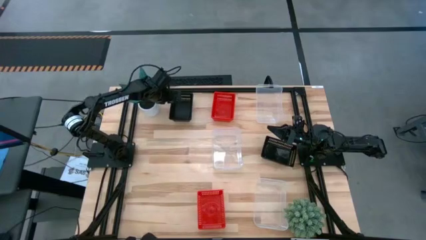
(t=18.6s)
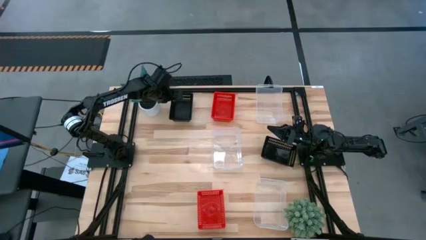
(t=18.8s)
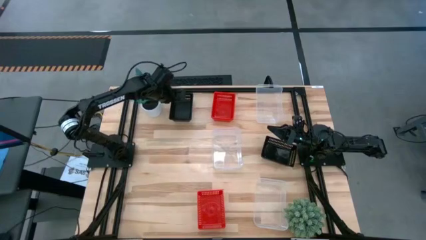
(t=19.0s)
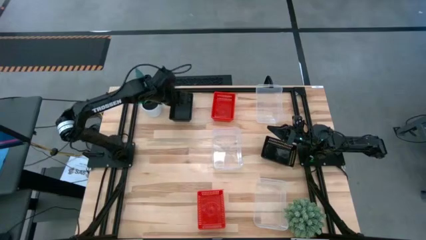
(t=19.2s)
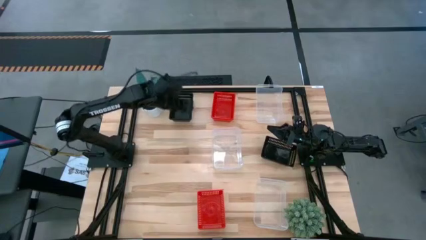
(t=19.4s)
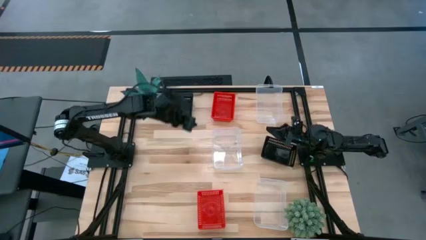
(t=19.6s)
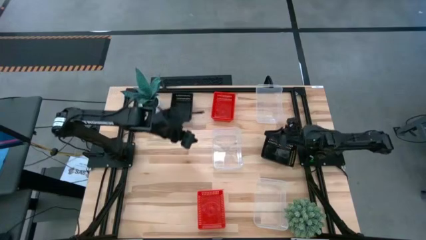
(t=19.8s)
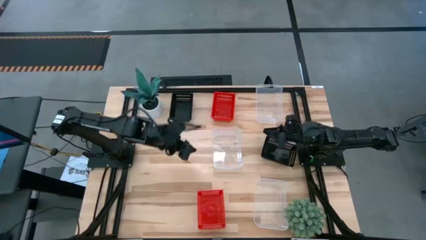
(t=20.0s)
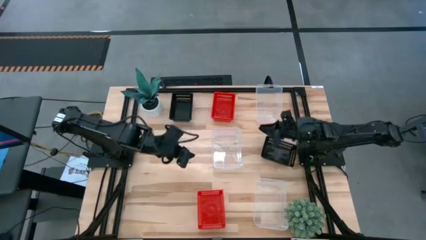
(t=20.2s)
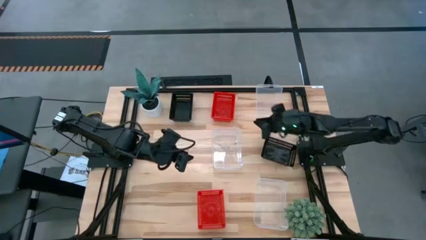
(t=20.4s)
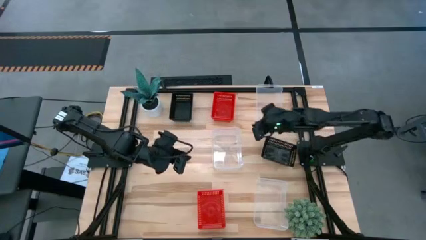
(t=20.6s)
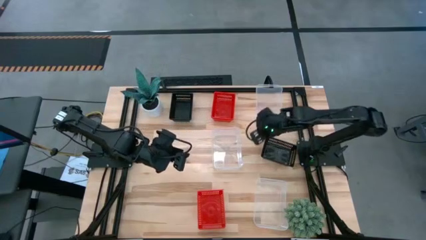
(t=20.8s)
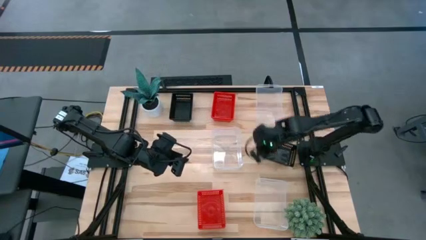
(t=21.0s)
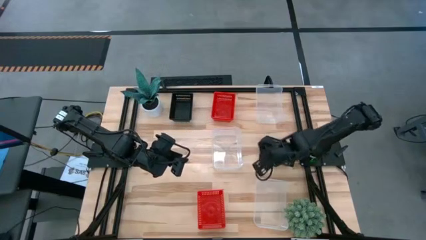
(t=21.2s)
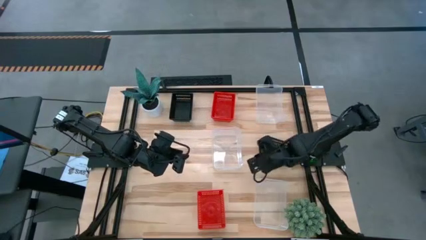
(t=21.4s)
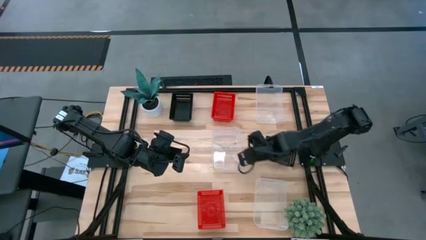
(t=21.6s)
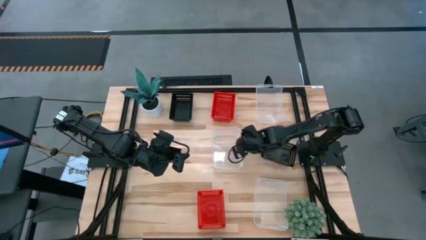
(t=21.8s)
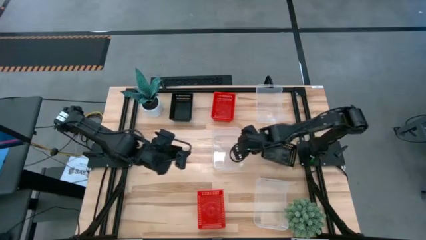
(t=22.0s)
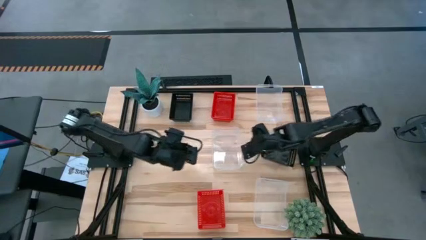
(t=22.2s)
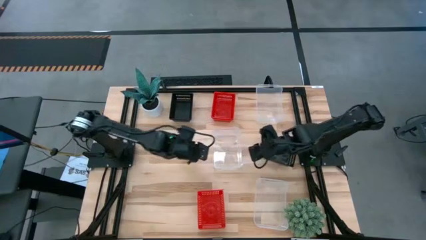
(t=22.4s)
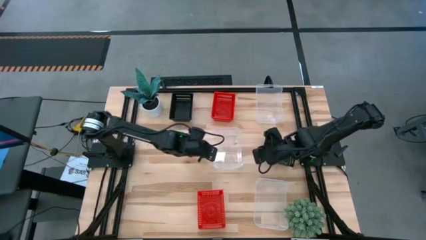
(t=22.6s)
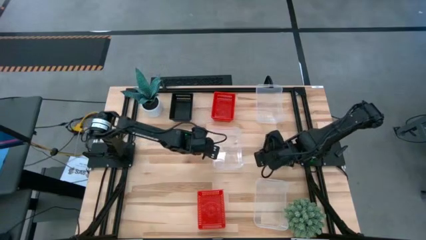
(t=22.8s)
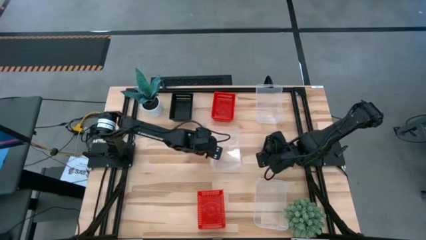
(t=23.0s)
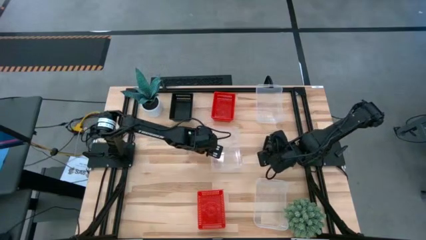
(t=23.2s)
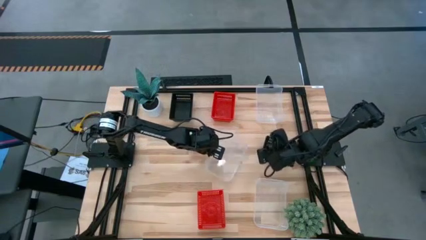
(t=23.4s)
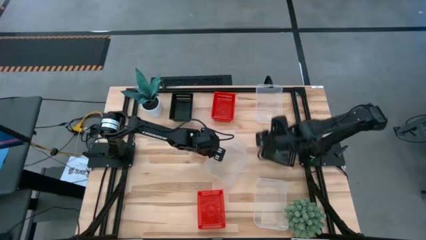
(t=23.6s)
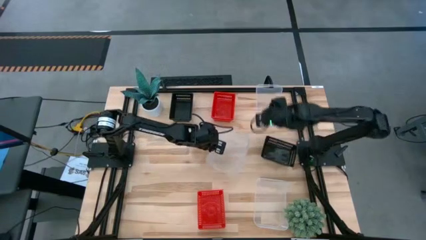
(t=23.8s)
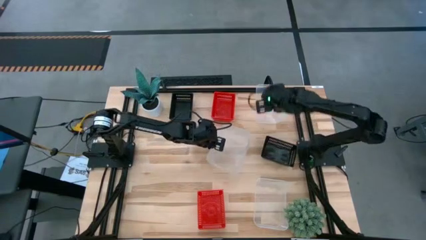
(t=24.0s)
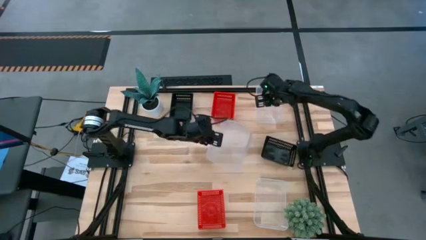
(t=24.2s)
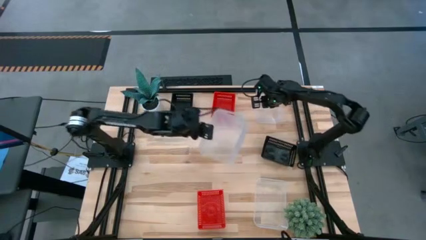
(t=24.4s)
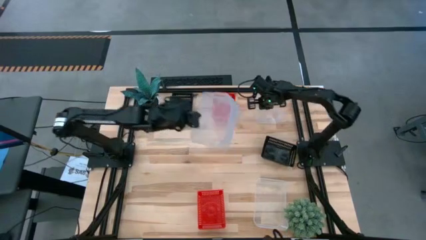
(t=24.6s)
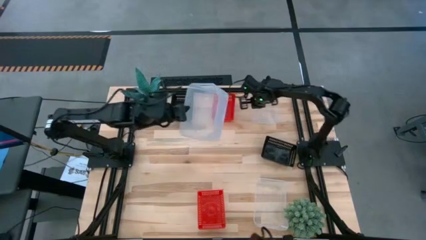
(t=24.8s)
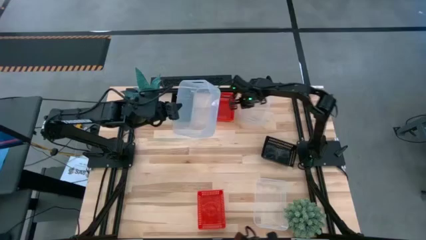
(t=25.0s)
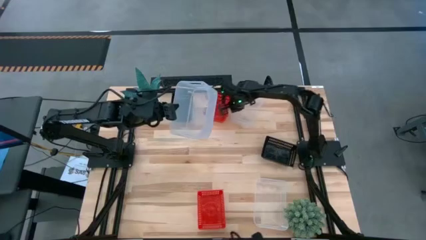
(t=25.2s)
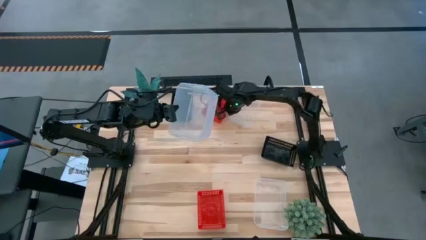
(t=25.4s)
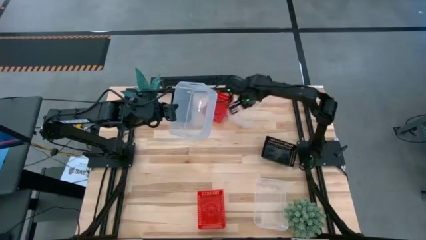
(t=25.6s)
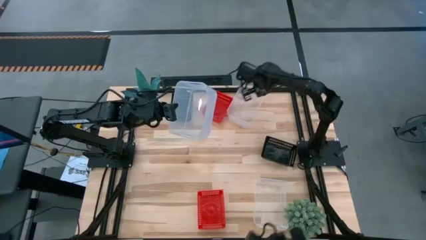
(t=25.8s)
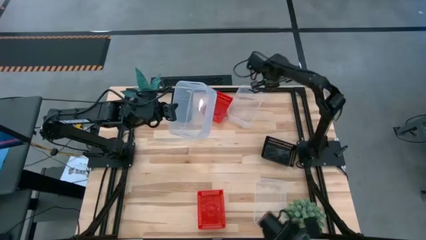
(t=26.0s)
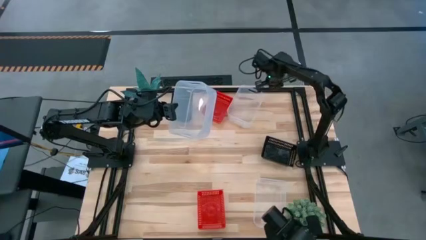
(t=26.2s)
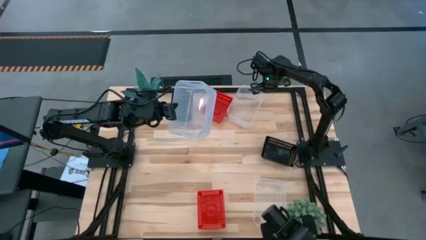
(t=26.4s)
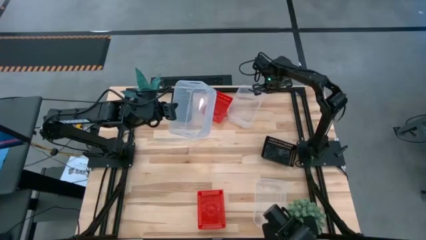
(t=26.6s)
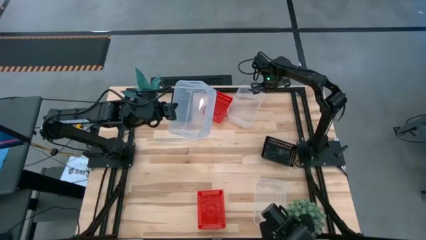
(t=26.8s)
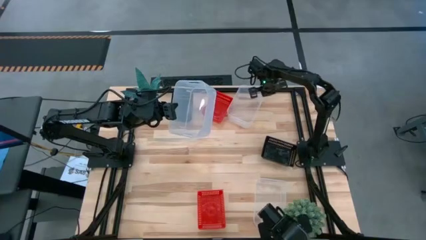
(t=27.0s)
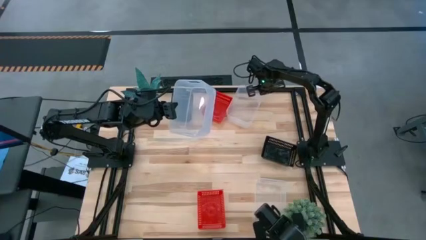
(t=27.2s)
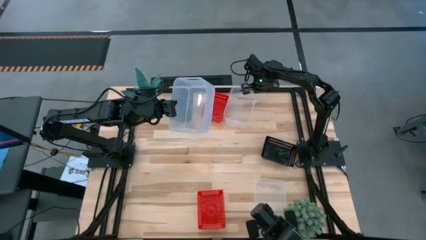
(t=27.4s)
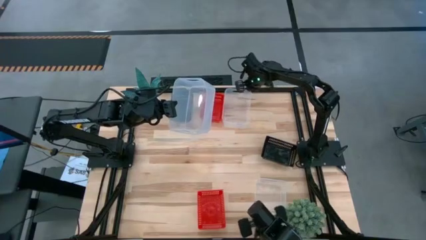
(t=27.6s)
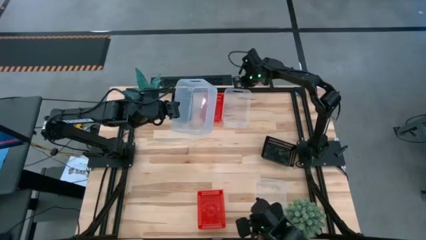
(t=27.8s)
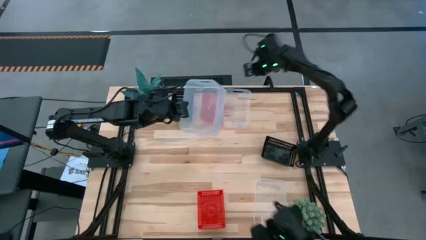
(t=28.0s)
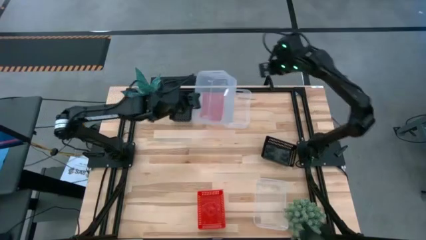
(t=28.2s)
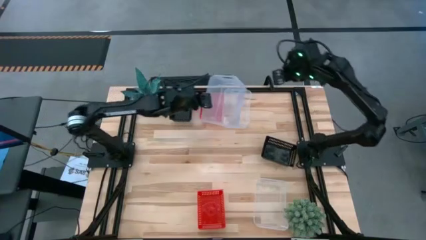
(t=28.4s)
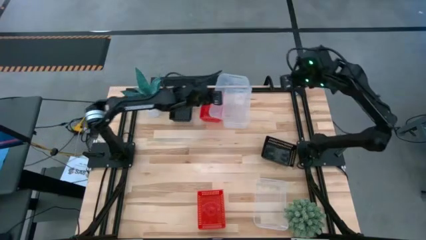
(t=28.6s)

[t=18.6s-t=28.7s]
Stack the middle transparent bin on the top transparent bin

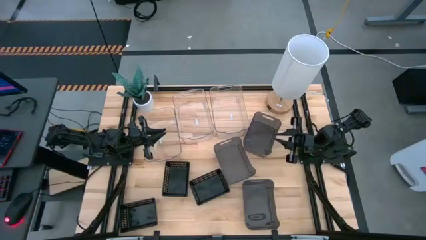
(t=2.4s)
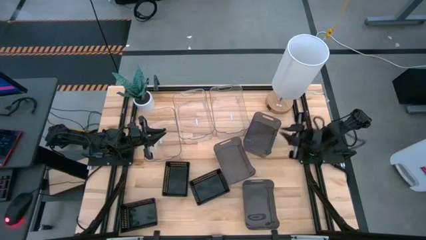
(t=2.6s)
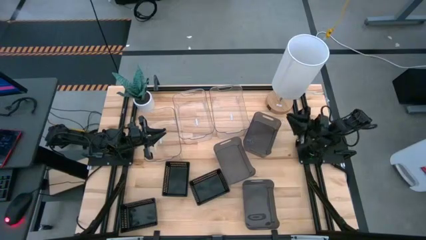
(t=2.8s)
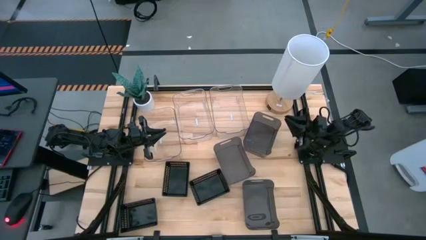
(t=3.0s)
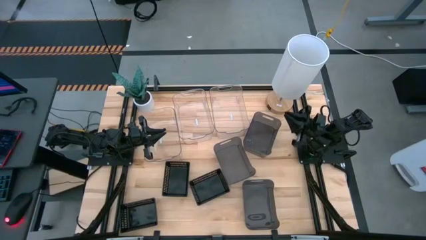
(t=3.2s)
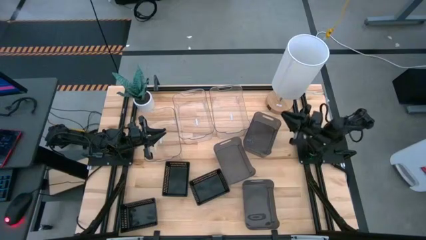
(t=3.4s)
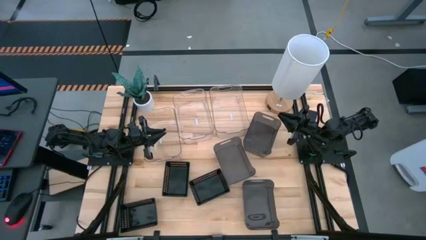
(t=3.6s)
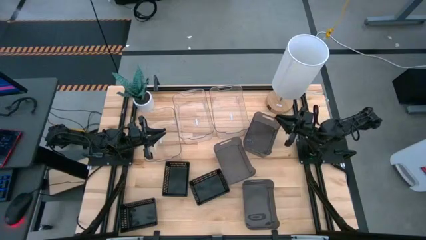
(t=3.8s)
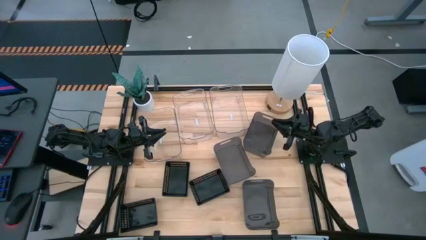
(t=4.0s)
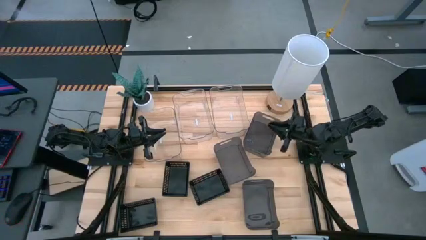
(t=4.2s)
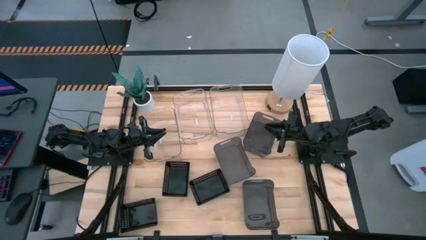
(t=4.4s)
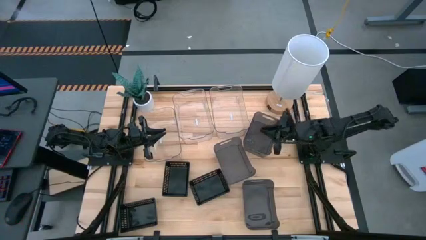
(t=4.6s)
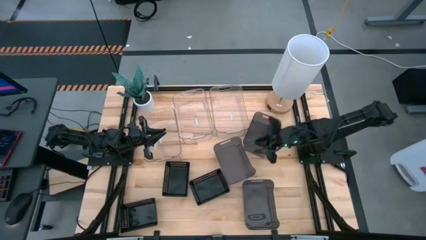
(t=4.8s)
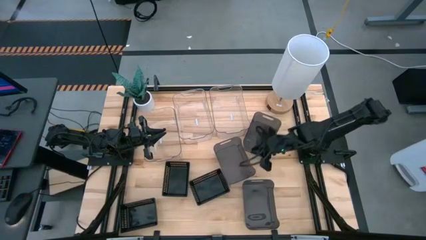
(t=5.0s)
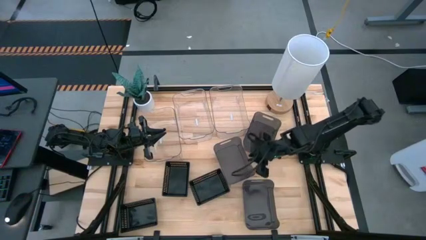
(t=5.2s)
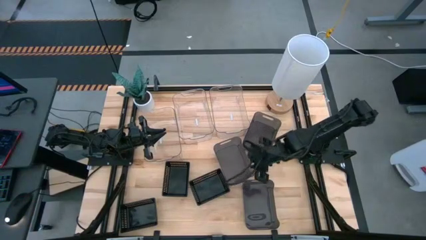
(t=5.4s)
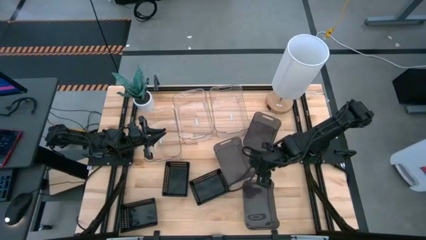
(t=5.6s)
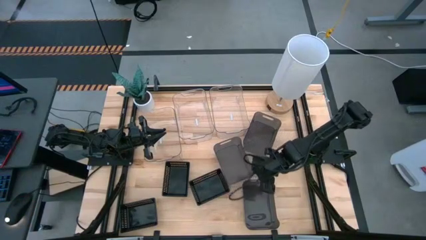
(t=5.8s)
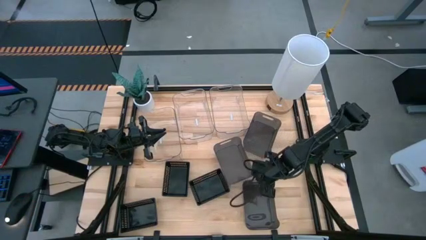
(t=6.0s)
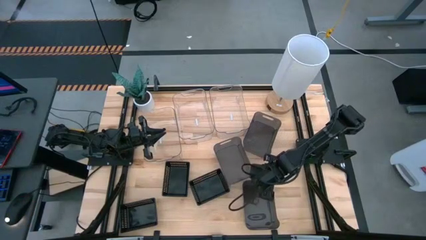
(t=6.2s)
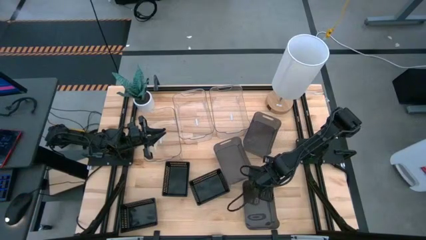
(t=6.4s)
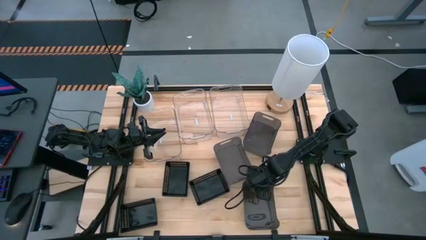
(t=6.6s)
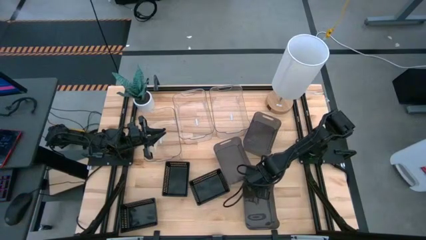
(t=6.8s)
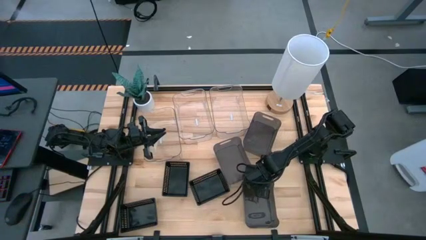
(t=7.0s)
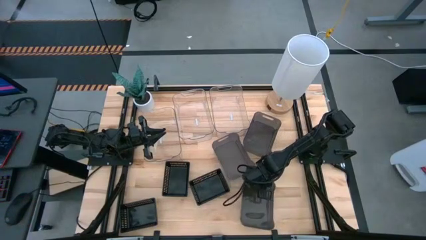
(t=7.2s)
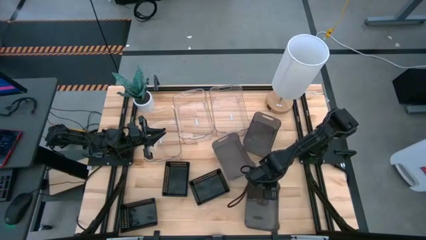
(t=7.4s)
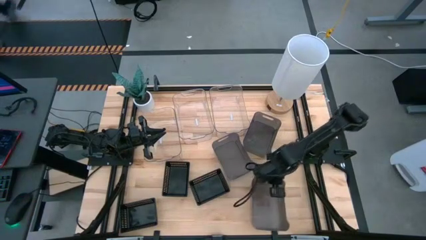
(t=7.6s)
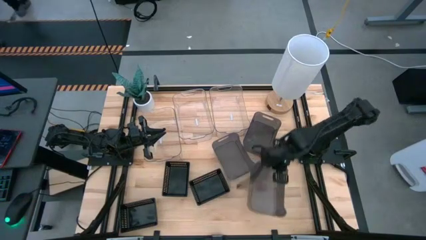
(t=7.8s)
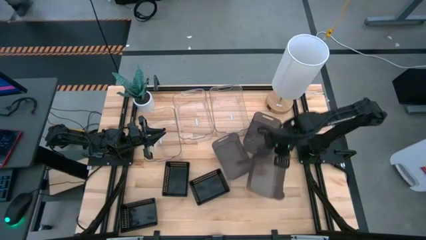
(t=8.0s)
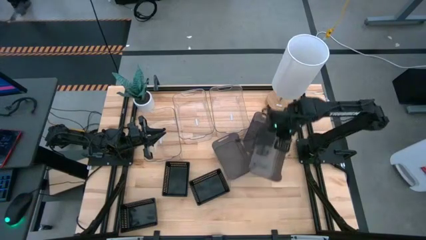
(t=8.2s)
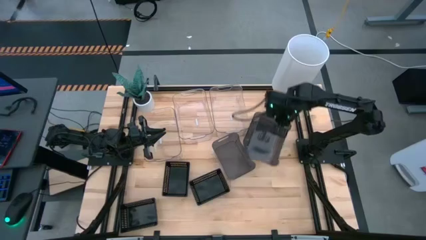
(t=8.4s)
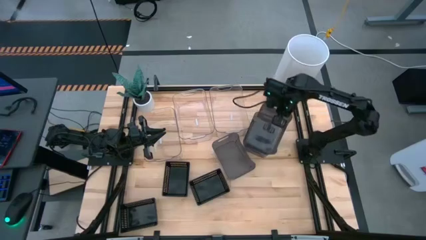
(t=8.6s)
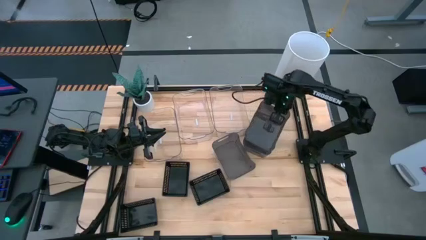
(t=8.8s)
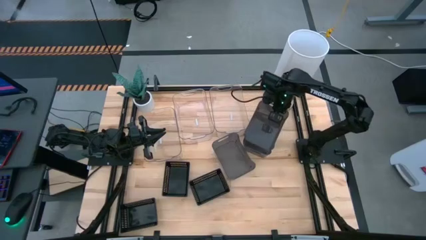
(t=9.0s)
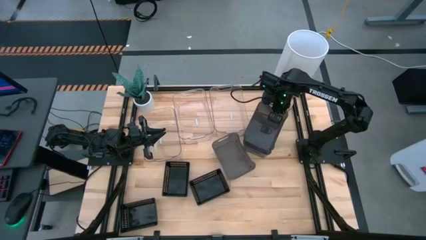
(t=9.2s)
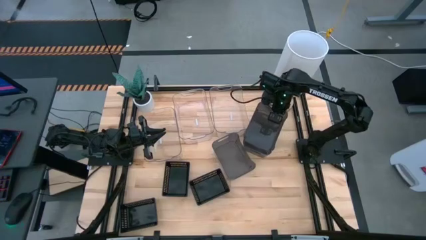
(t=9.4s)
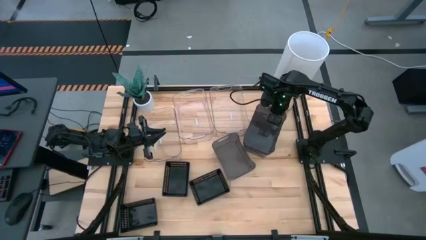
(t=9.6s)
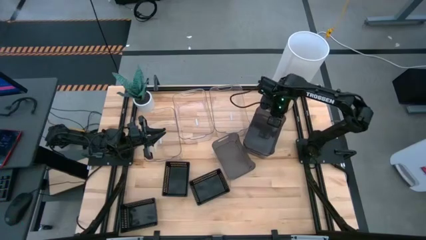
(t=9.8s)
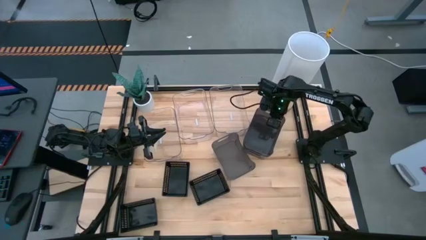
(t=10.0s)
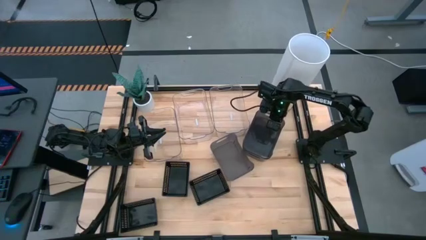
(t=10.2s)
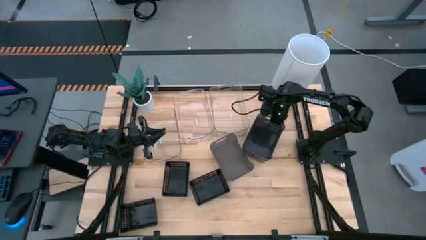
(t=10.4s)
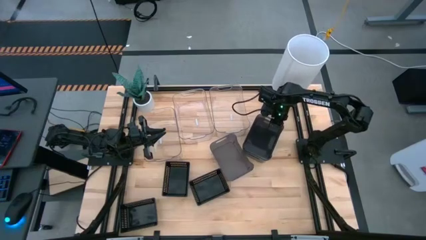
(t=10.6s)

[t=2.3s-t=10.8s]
Stack the bottom black bin on the black bin
